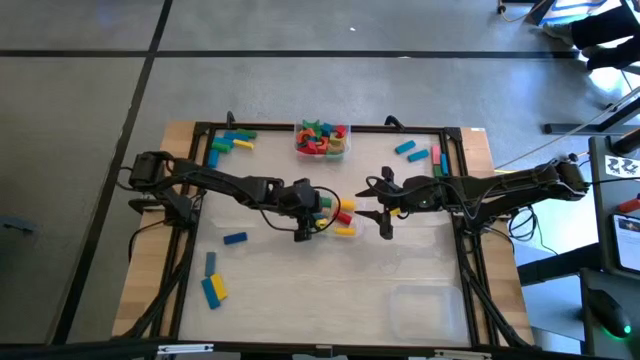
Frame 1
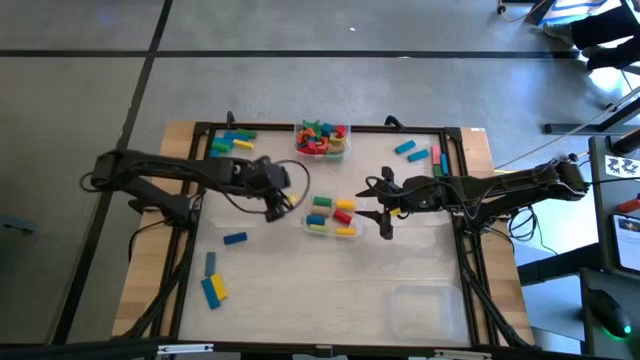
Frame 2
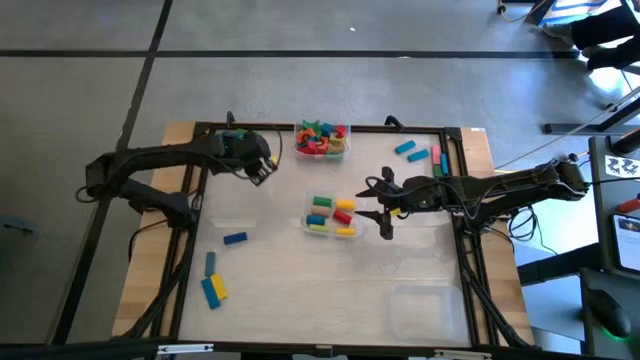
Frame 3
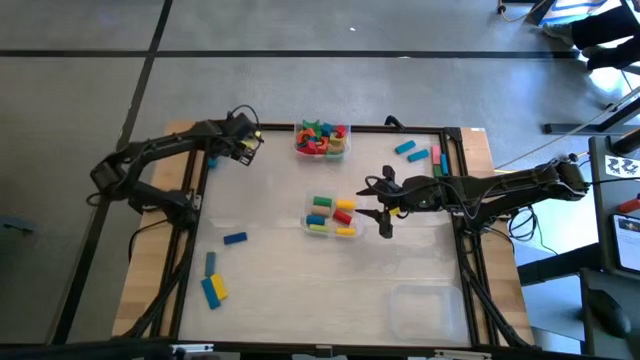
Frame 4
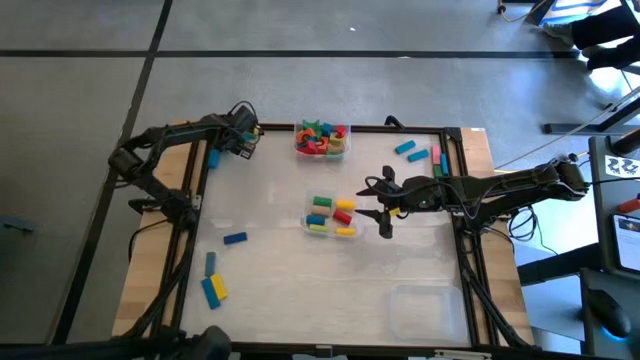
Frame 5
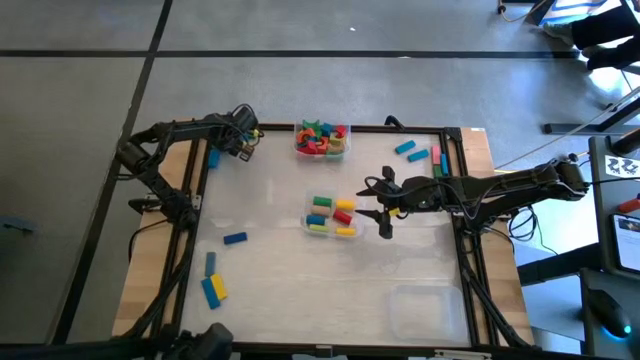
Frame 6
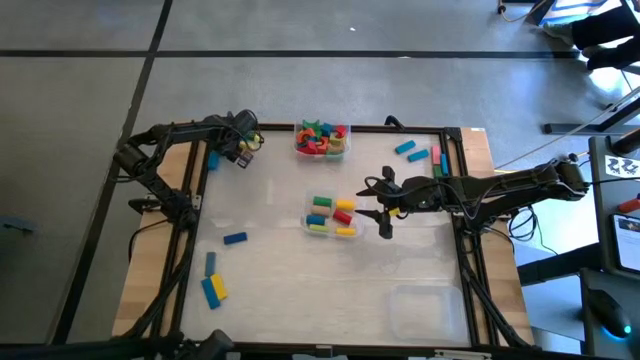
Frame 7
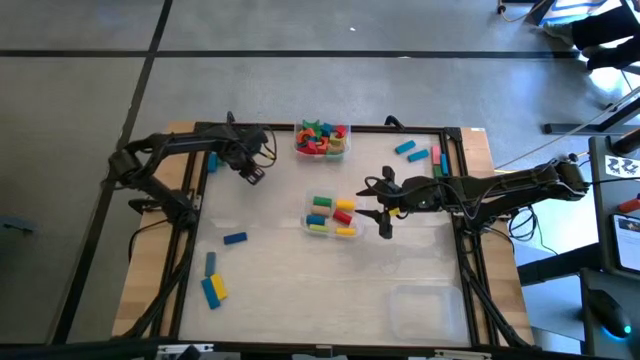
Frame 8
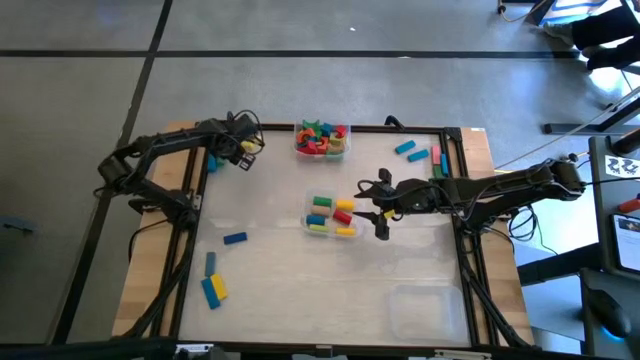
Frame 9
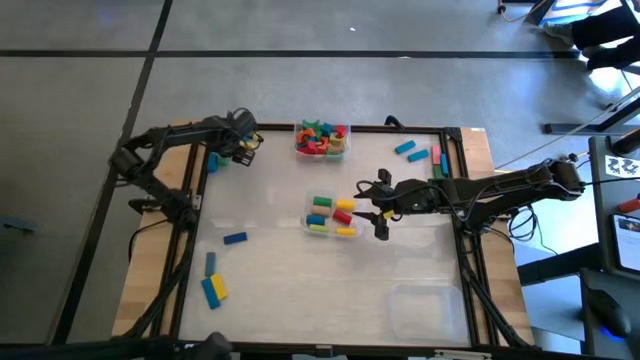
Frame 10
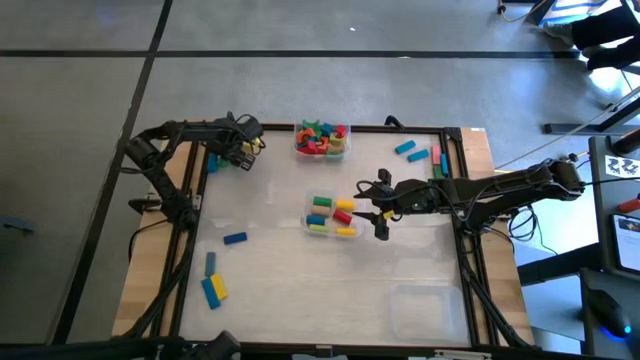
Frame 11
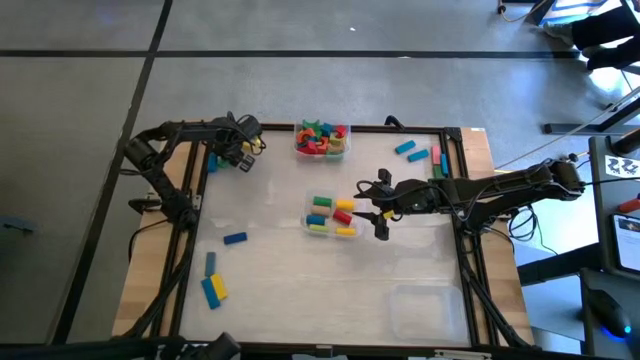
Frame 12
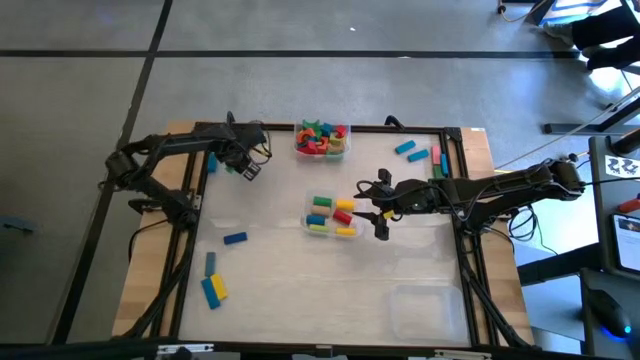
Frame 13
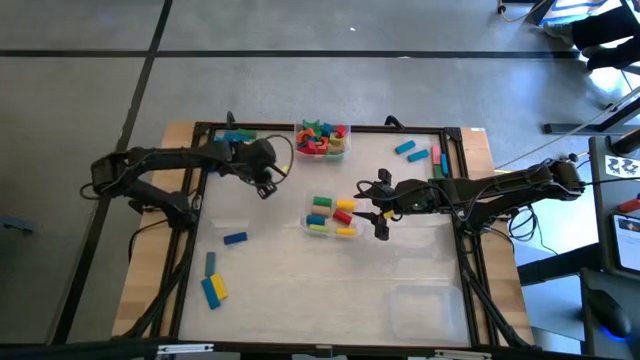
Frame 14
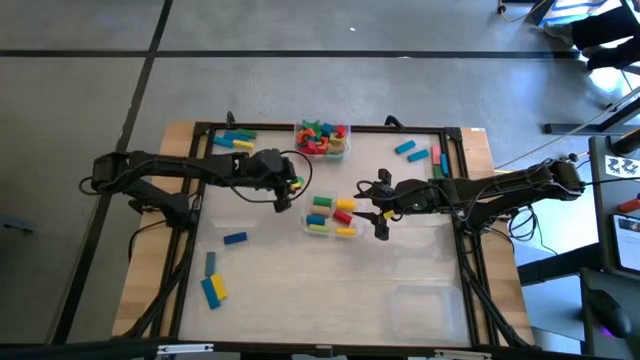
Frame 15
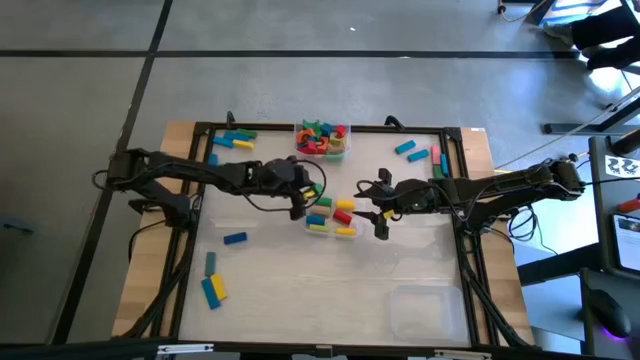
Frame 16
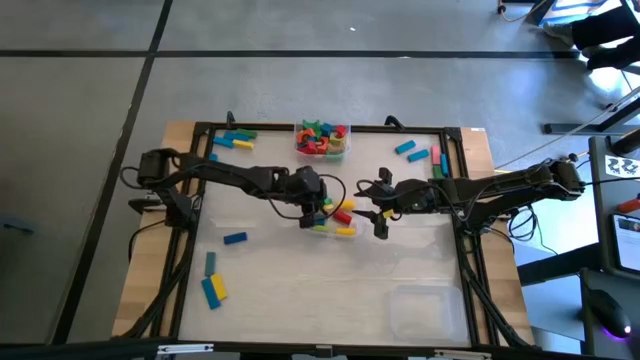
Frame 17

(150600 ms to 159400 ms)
Task: Sort blocks by size
Put the green cylindrical block into the center transparent bin

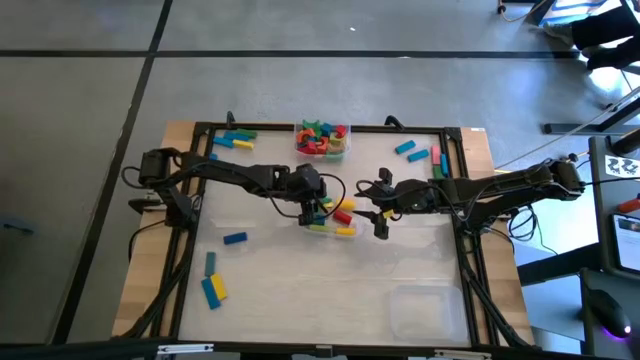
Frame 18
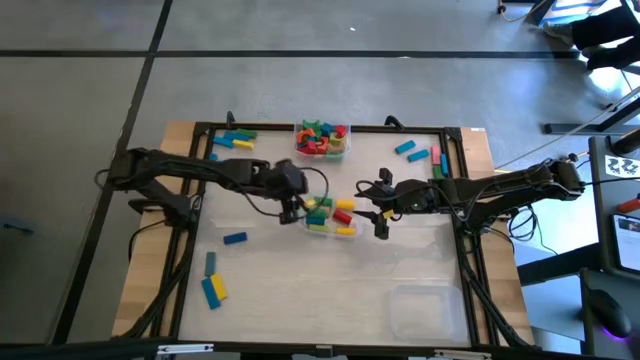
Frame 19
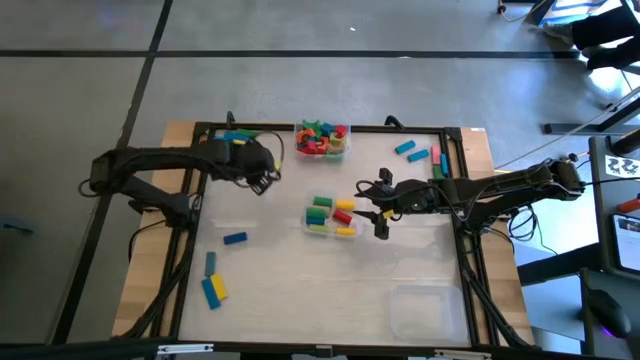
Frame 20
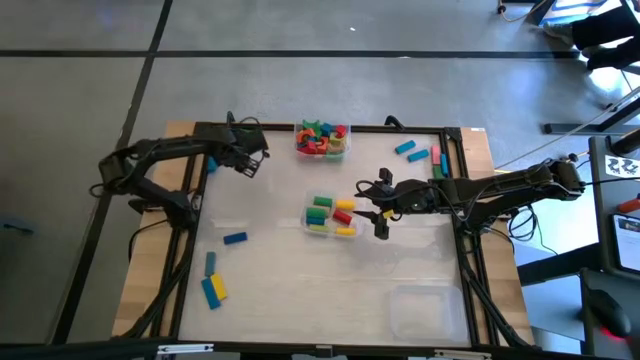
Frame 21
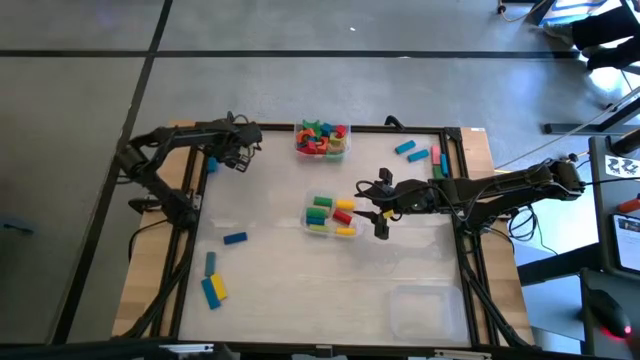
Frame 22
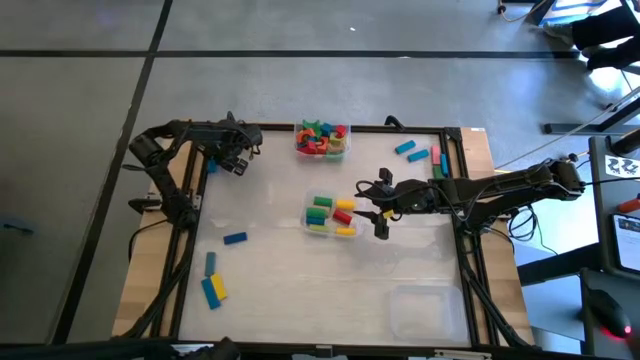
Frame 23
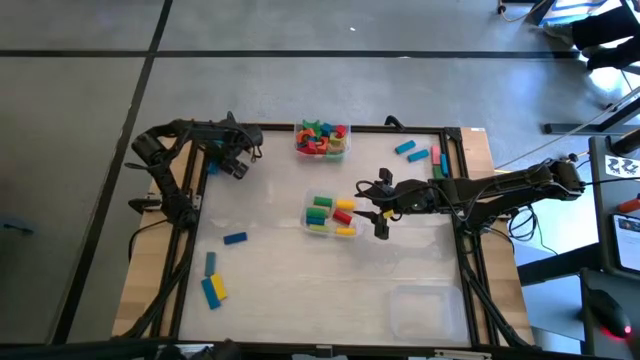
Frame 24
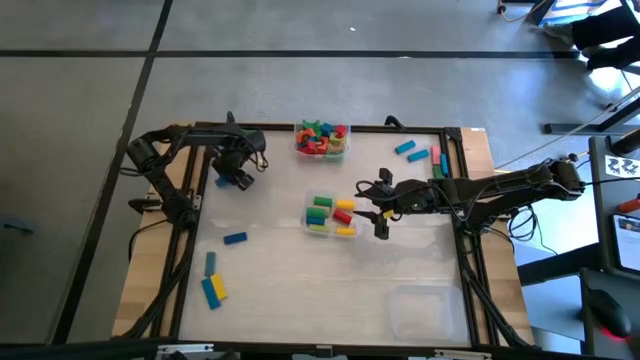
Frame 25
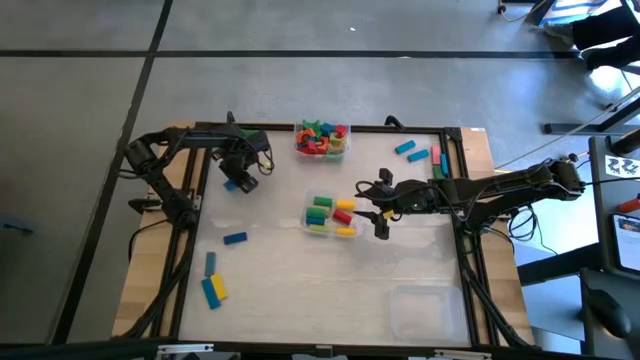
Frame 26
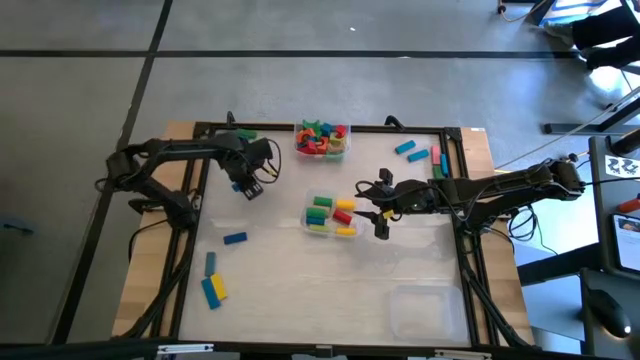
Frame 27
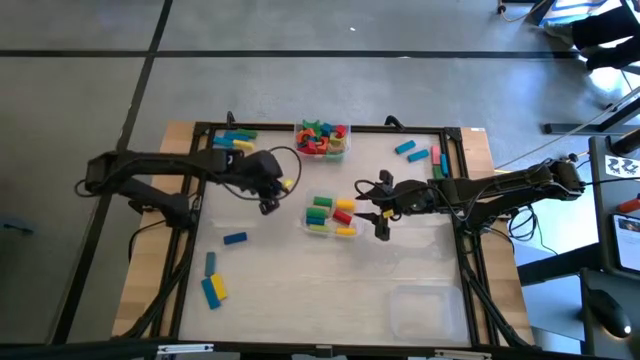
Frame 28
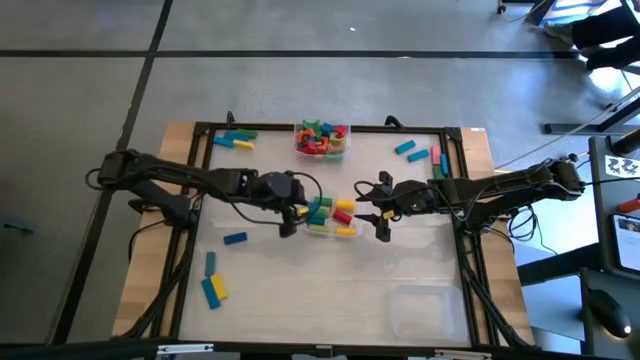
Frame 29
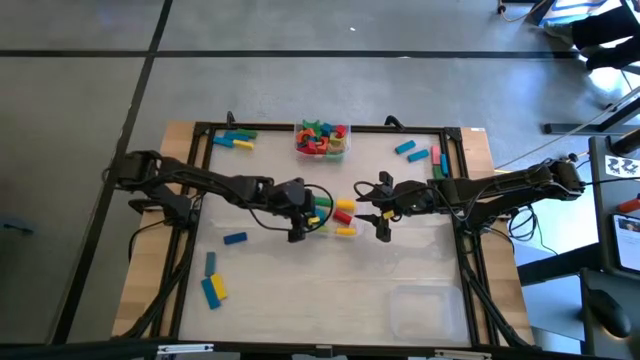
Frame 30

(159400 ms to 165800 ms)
Put the blue cylindrical block into the center transparent bin

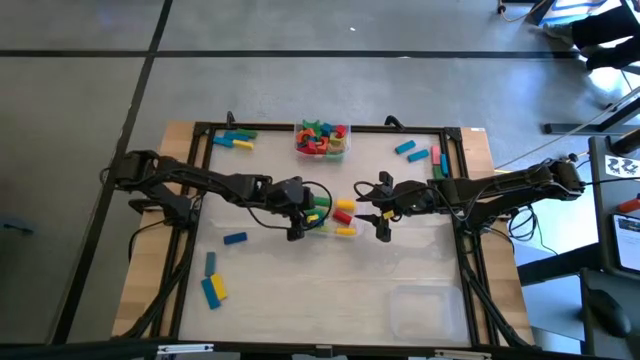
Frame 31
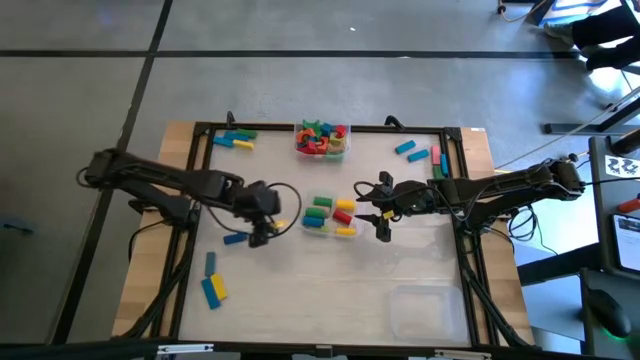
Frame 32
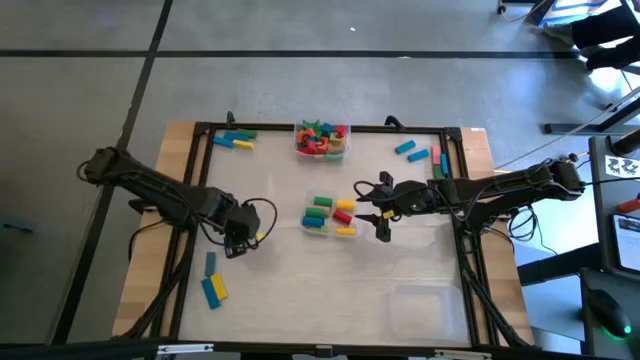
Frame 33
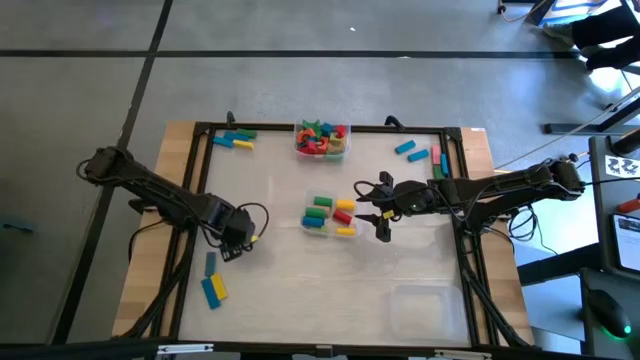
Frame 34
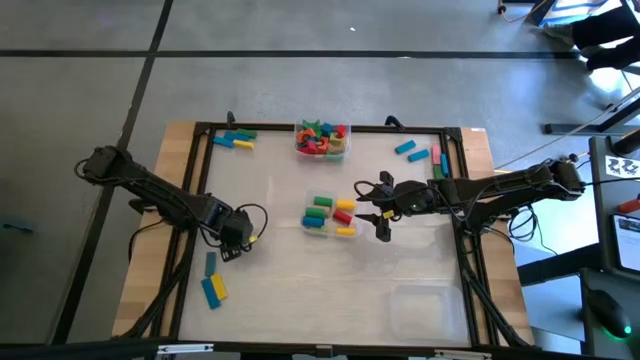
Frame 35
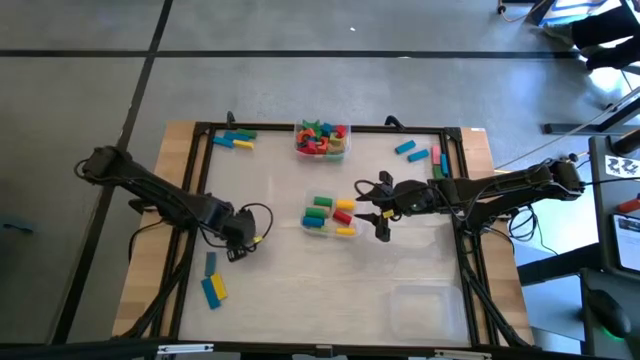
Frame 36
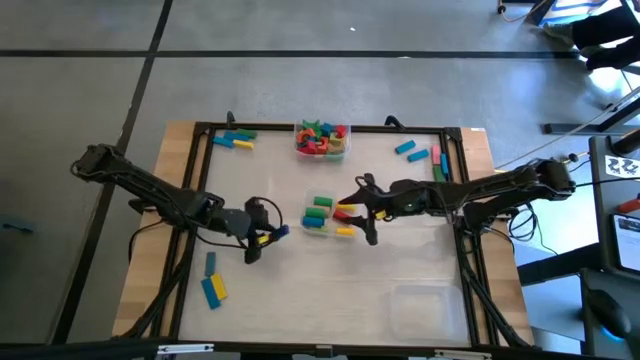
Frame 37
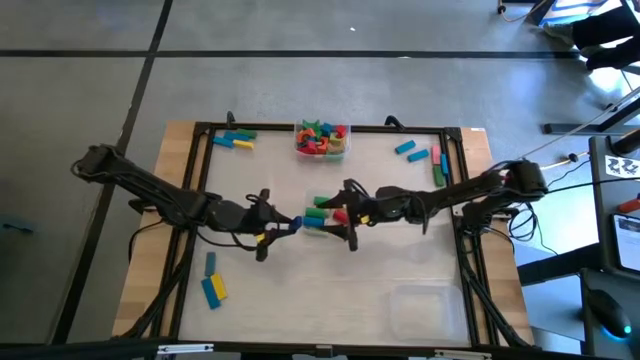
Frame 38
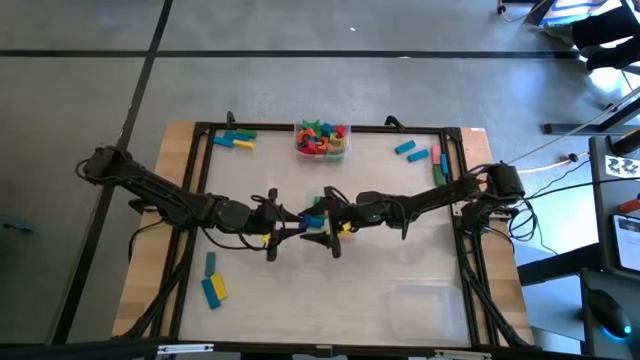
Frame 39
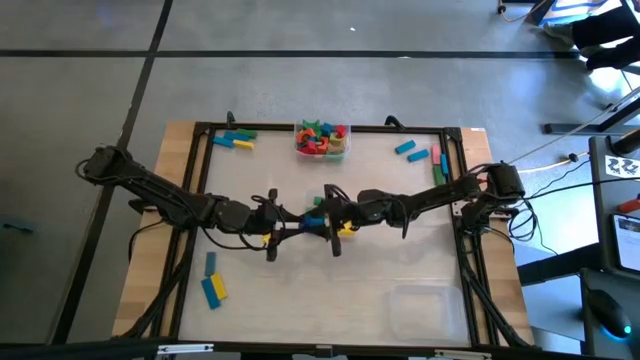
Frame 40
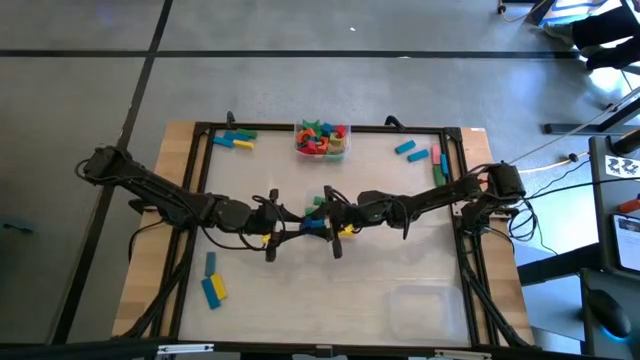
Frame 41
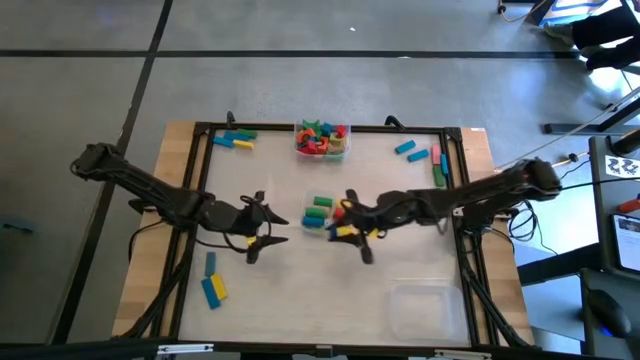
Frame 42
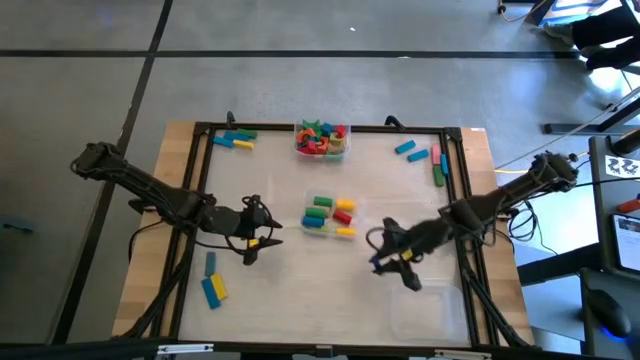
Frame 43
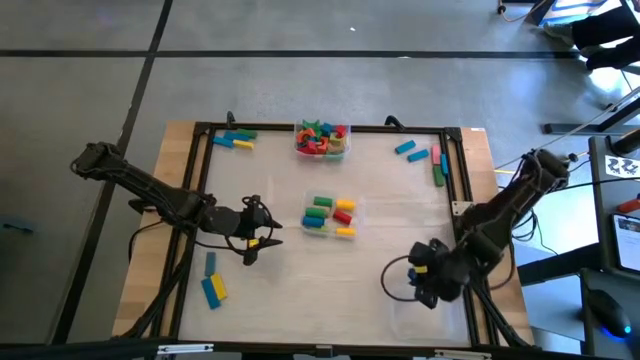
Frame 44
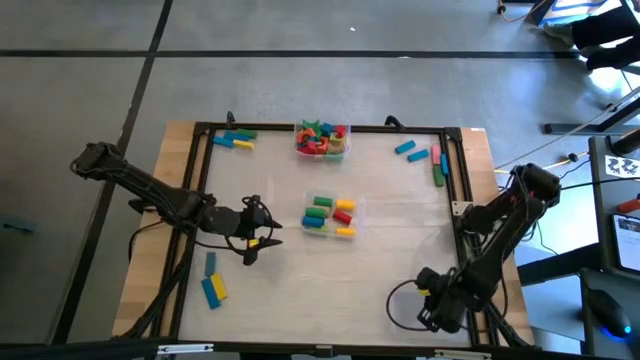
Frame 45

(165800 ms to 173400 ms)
Put the dark blue rectangle block into the bottom transparent bin
